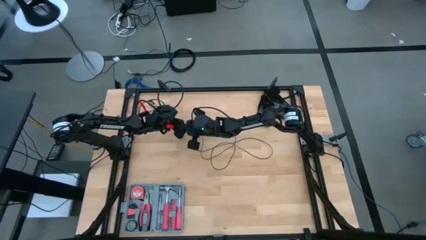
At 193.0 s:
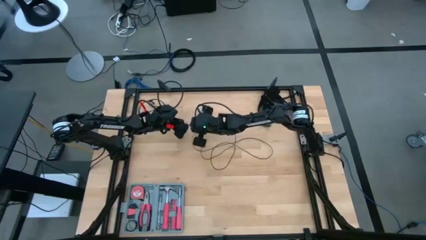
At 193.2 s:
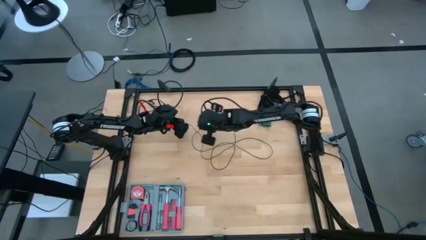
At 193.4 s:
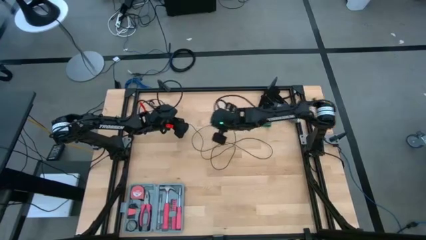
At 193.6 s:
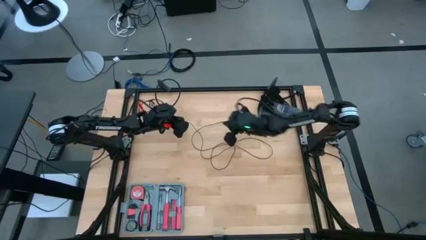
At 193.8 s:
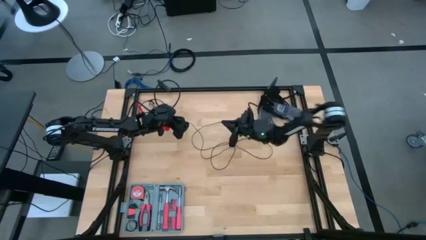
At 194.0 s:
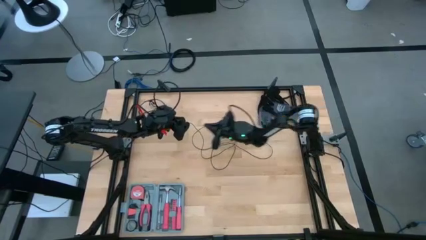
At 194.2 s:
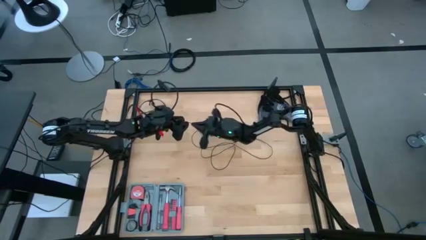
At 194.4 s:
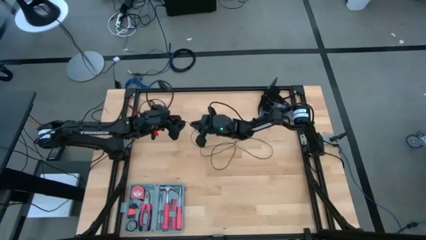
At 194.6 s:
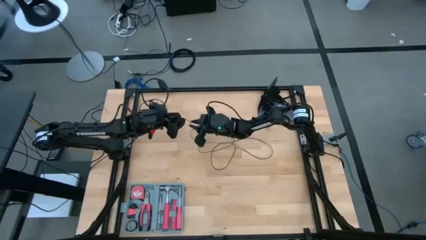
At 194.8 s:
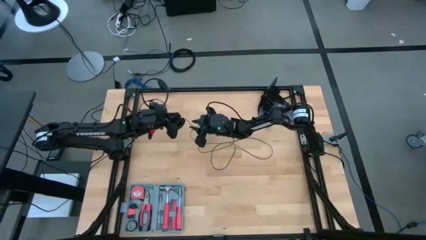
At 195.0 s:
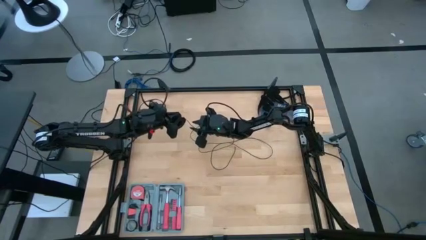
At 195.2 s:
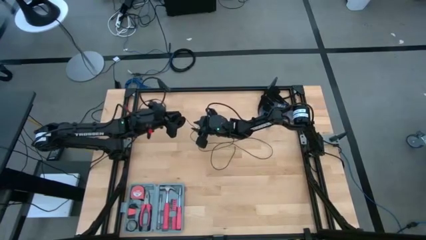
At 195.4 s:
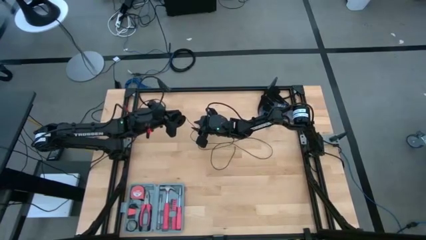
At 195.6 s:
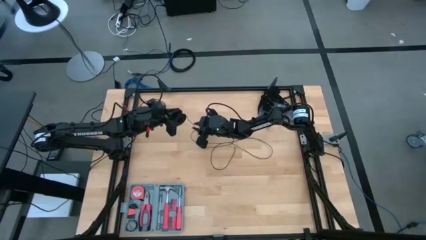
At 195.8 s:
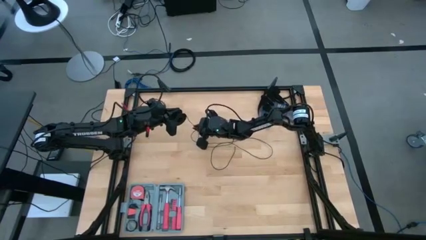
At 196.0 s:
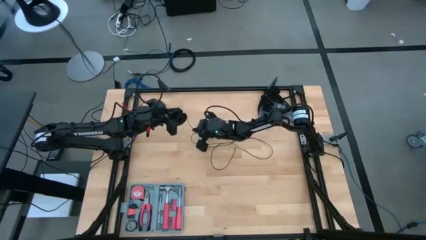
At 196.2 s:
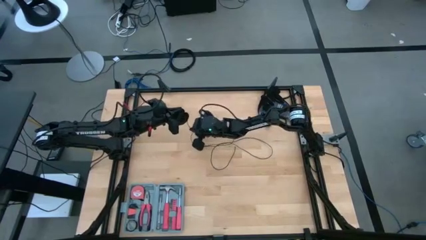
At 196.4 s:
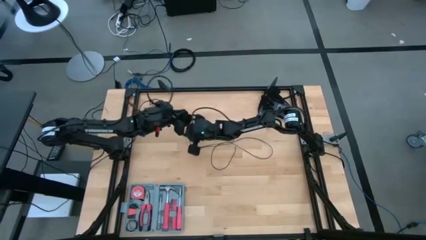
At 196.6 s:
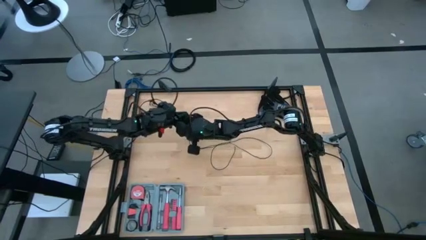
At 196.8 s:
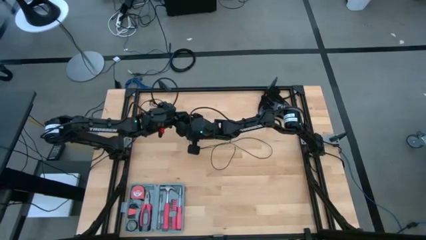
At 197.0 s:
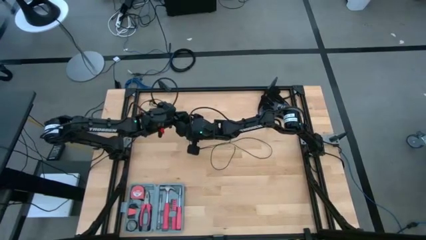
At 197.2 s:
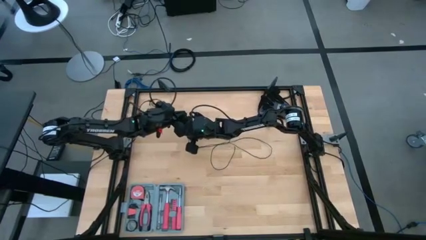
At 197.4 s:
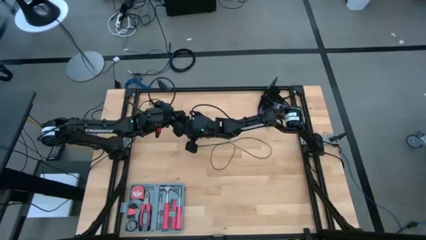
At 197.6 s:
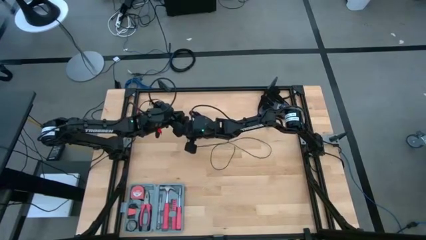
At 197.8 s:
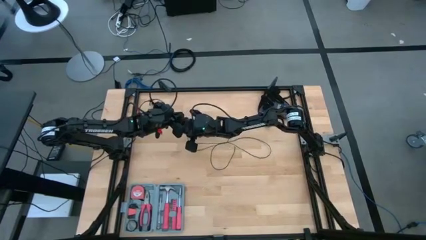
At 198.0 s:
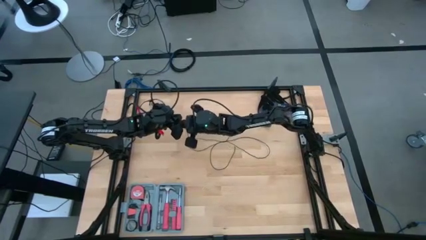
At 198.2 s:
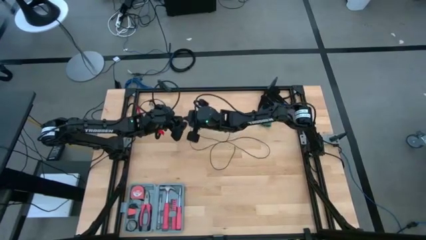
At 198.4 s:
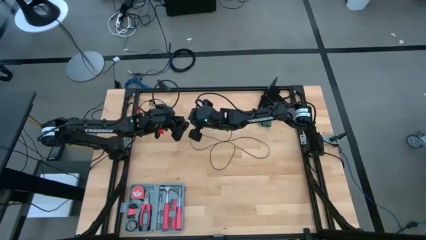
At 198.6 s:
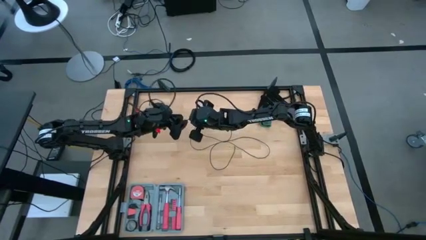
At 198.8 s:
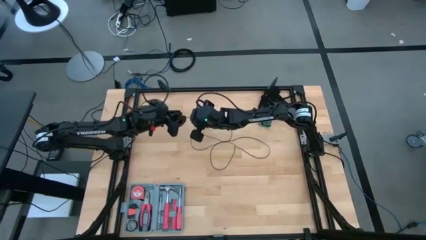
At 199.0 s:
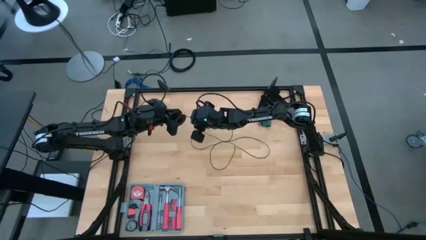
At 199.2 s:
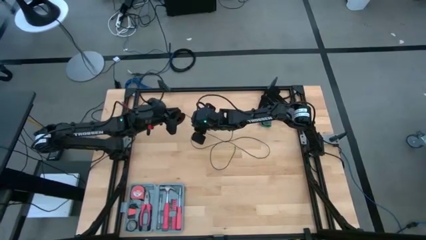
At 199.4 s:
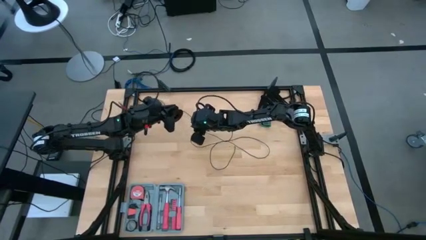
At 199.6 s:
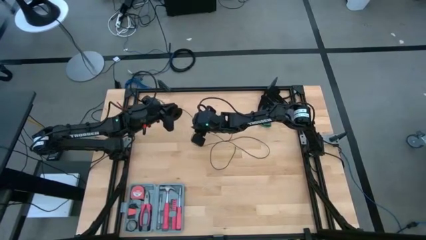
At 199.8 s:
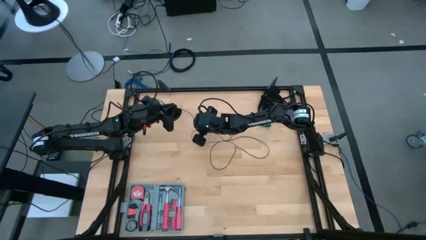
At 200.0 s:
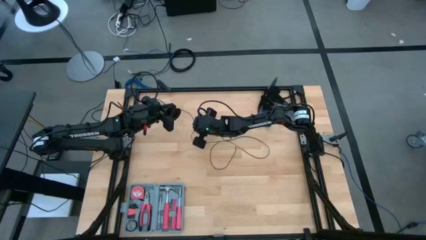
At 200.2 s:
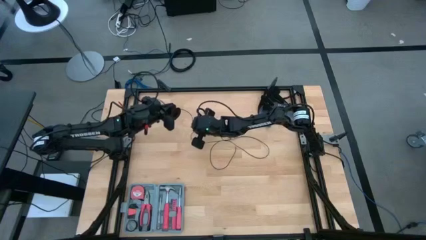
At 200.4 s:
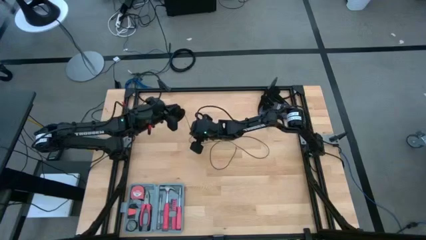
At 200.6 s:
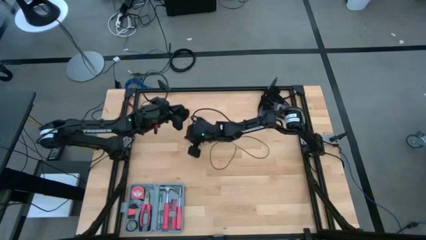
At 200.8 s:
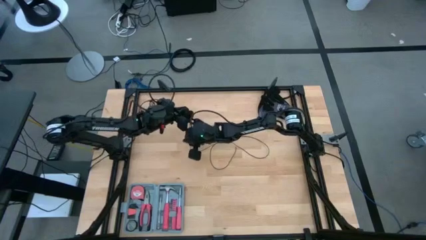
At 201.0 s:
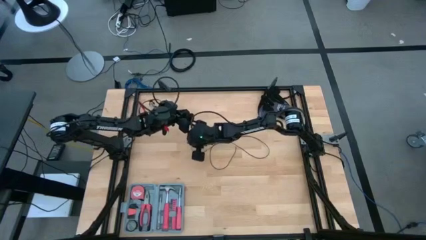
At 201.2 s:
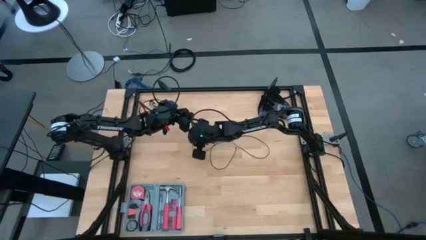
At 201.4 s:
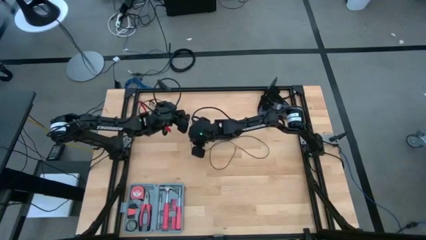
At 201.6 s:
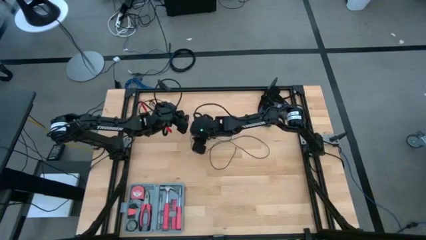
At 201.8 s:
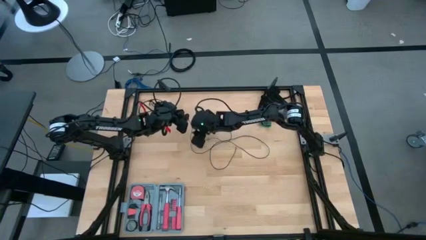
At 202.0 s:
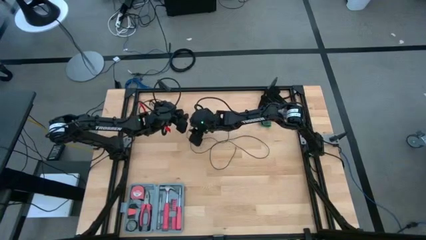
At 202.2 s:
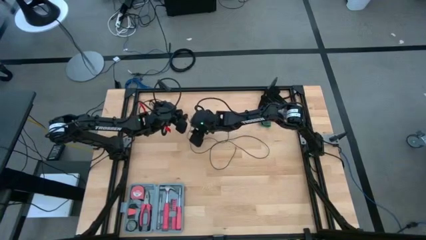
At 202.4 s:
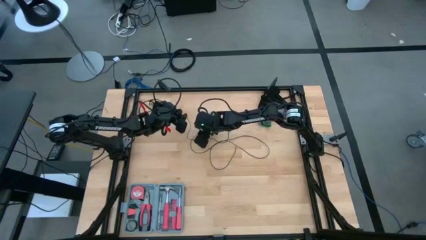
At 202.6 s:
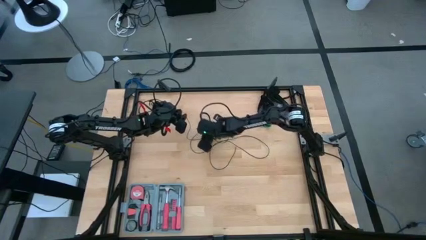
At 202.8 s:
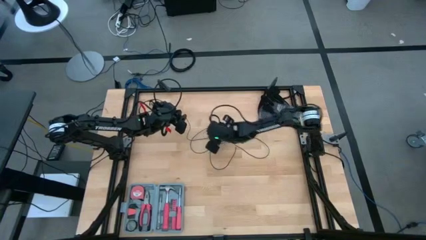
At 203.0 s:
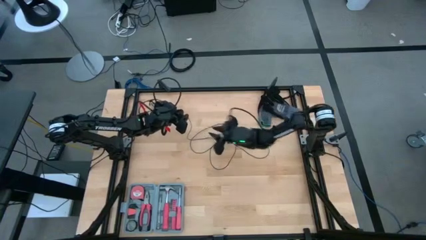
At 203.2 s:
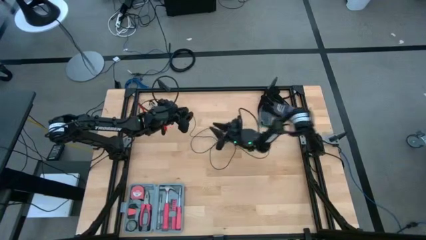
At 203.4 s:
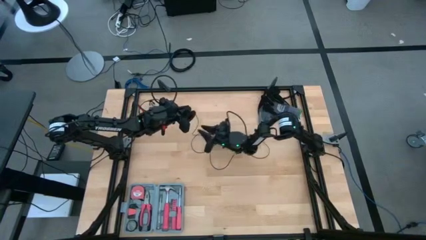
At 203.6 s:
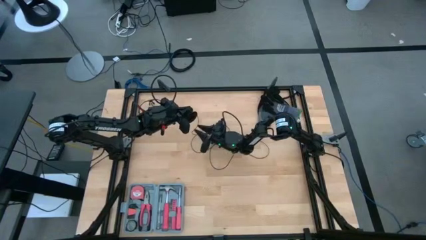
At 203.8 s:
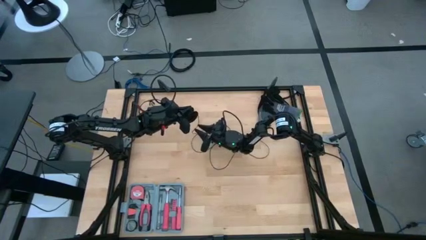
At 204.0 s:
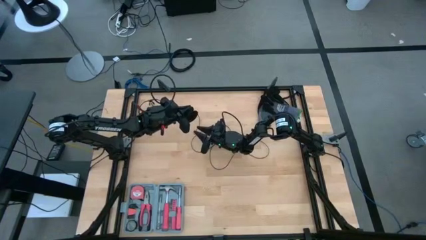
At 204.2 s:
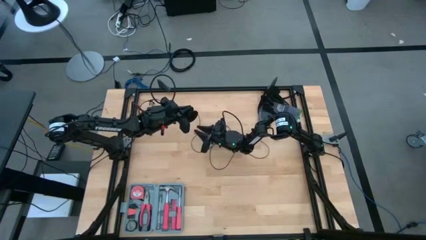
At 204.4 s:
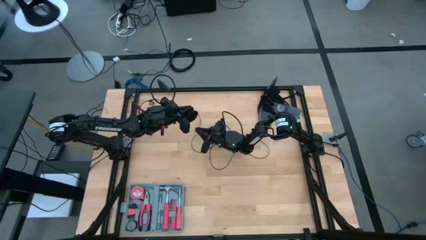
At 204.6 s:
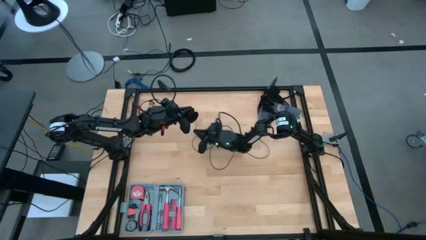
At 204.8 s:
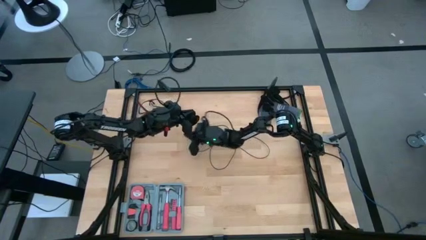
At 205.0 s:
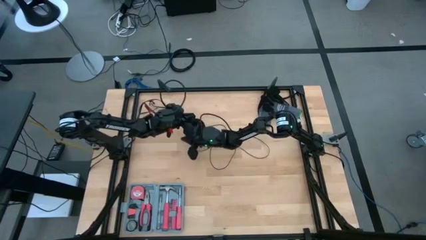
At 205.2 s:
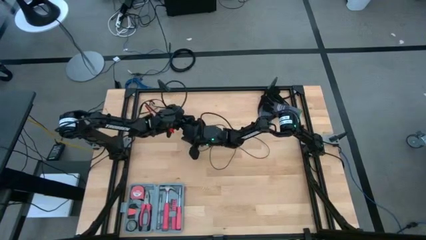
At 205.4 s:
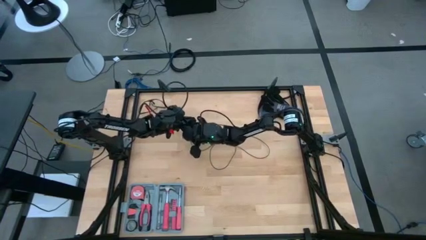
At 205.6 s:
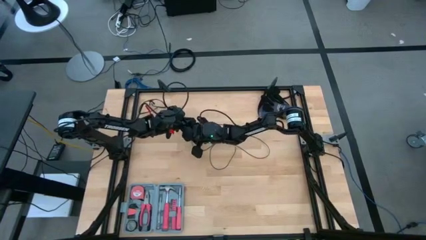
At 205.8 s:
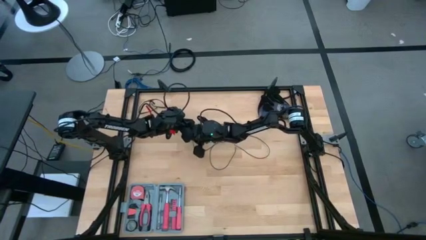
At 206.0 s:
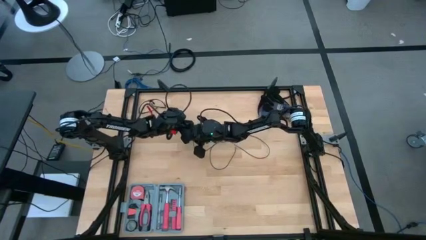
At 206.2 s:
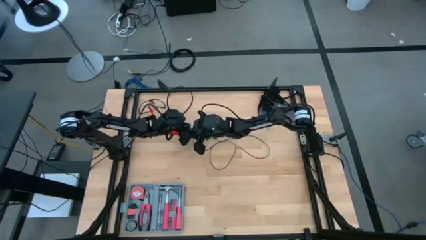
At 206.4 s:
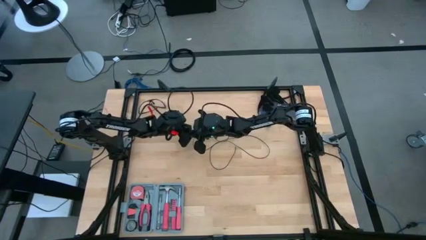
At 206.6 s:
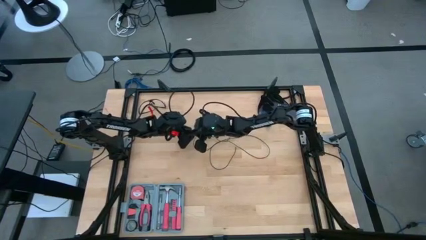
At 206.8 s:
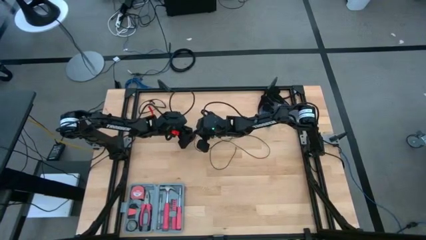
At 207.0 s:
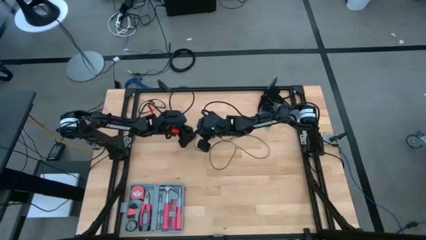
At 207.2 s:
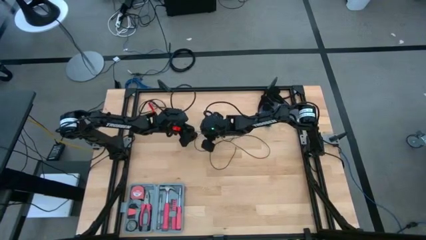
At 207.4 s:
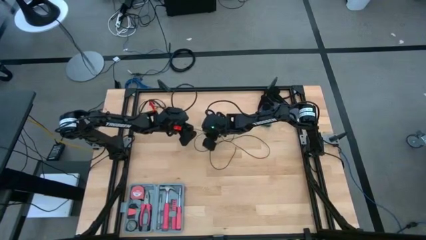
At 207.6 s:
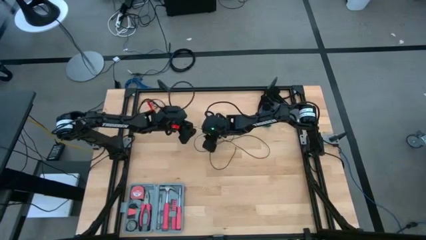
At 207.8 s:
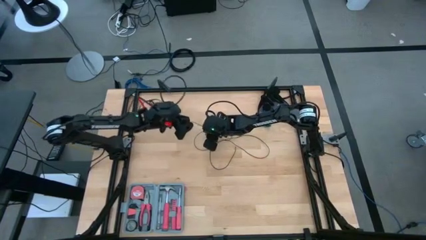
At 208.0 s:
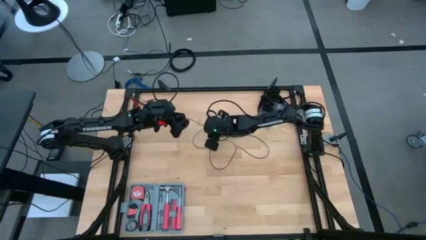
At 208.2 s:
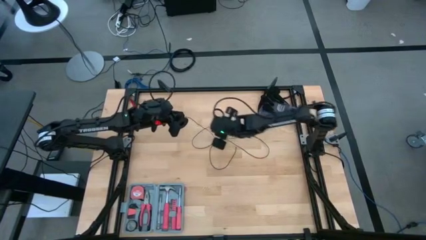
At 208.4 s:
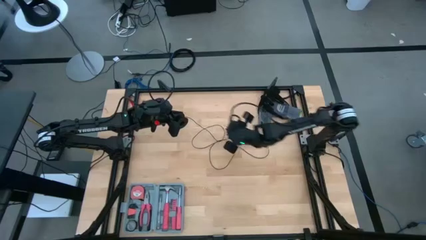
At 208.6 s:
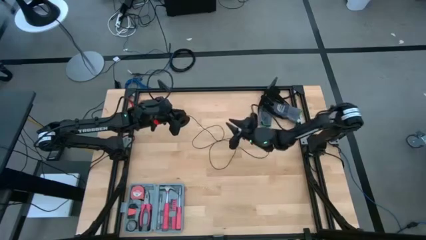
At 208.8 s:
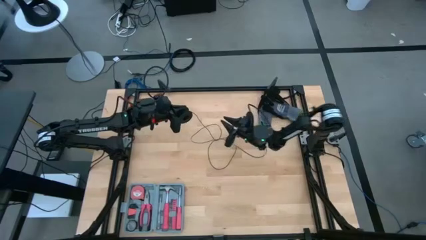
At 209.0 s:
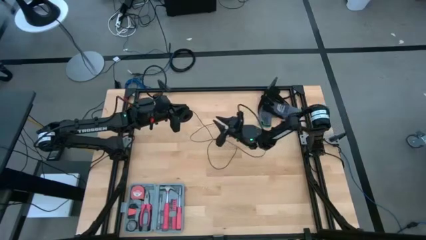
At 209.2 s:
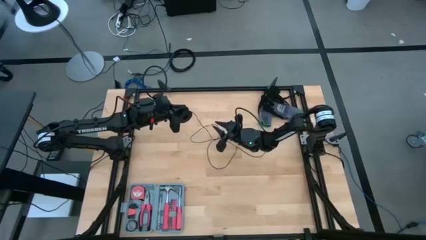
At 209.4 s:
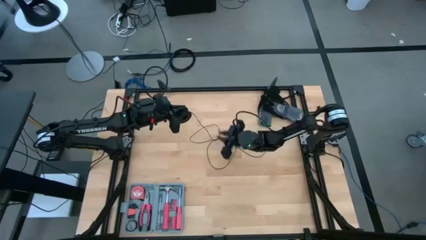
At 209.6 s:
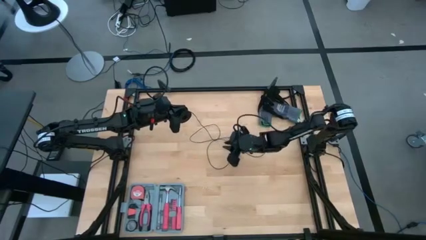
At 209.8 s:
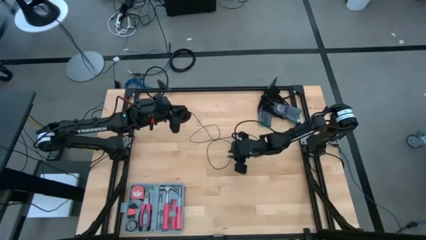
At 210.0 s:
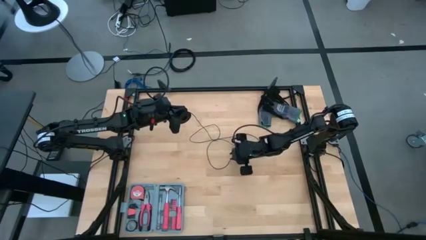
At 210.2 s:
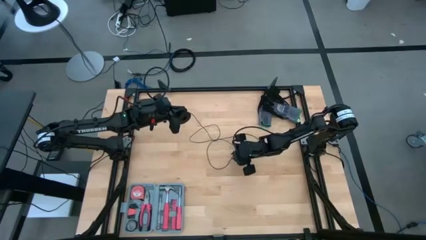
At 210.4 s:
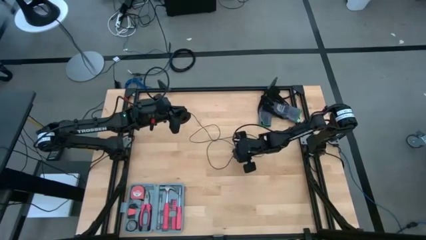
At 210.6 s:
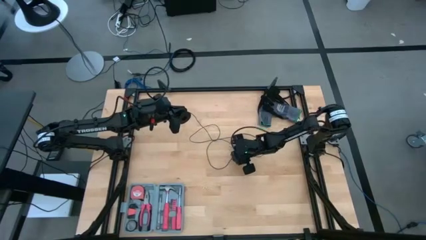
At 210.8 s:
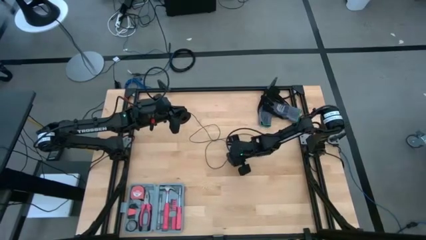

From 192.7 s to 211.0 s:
Task: Coil cords
Coil the black wire onto the black spool
